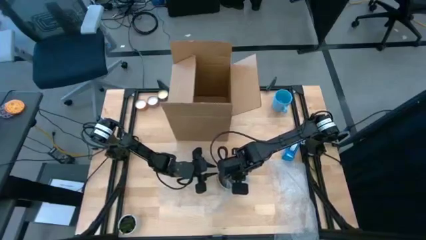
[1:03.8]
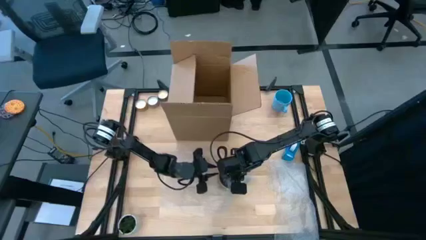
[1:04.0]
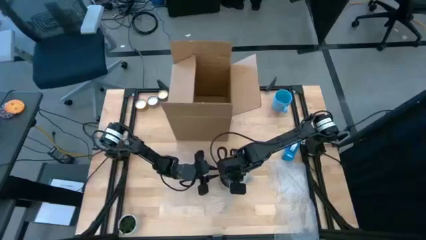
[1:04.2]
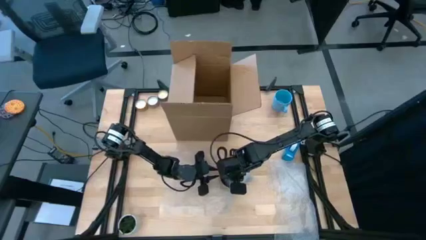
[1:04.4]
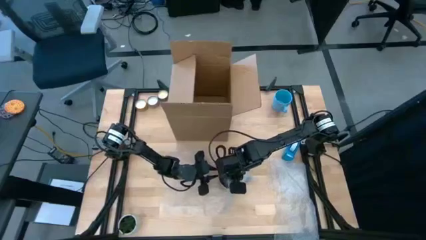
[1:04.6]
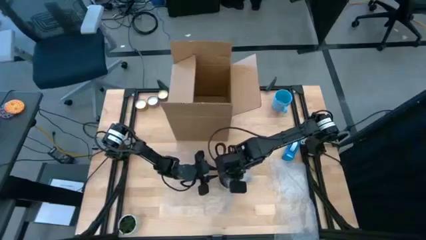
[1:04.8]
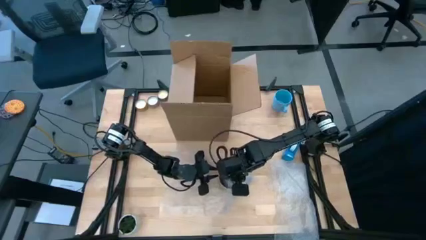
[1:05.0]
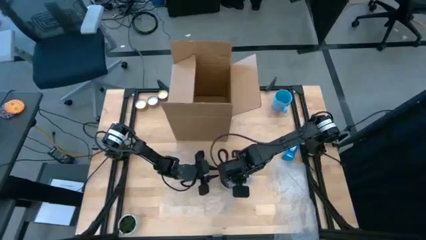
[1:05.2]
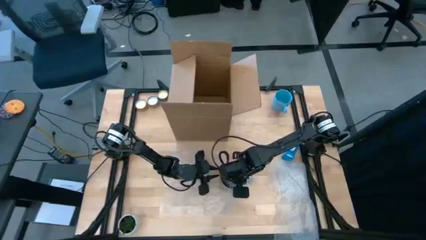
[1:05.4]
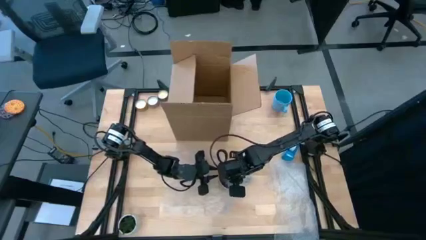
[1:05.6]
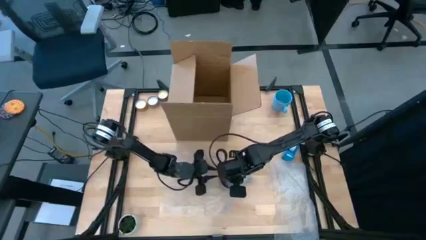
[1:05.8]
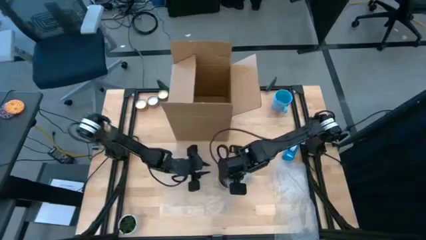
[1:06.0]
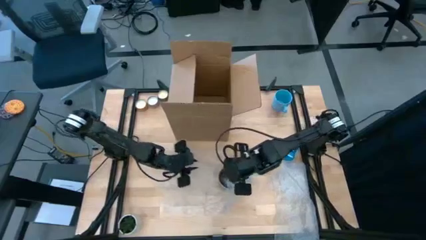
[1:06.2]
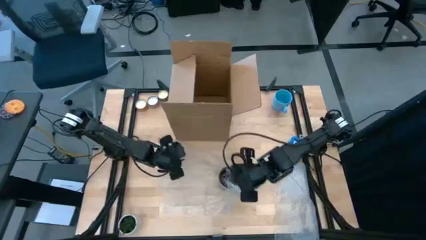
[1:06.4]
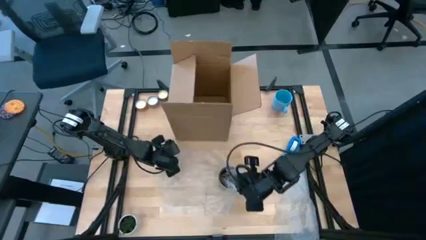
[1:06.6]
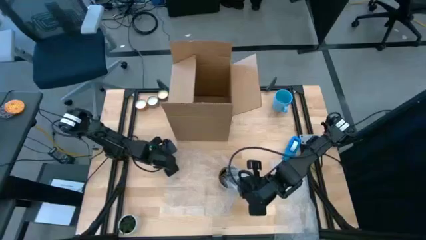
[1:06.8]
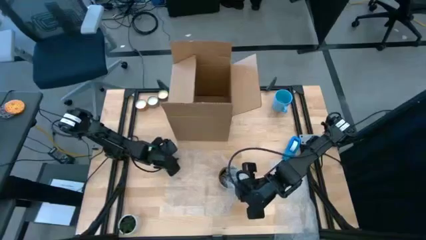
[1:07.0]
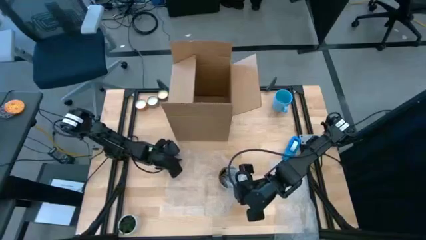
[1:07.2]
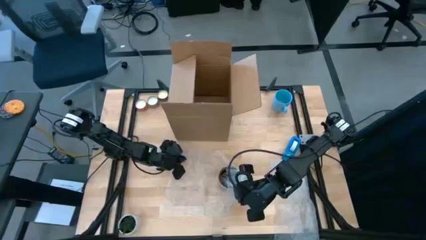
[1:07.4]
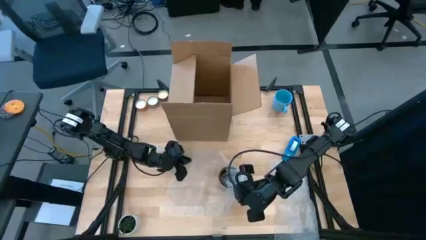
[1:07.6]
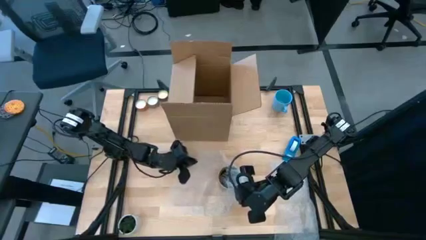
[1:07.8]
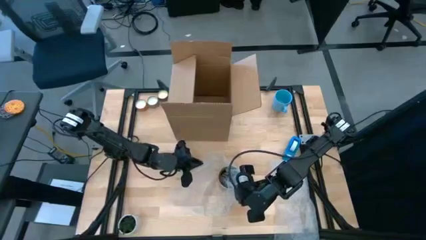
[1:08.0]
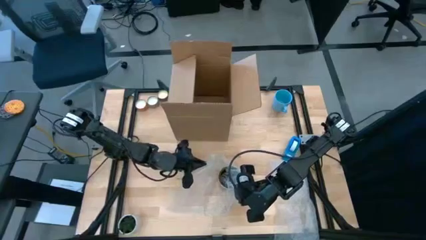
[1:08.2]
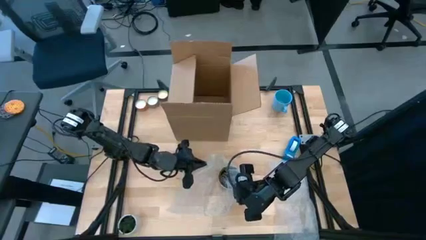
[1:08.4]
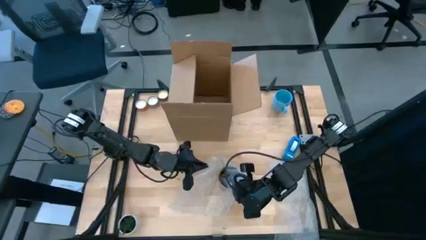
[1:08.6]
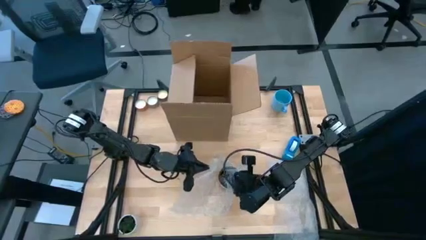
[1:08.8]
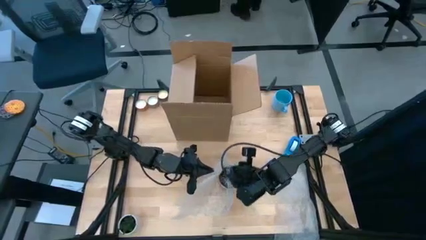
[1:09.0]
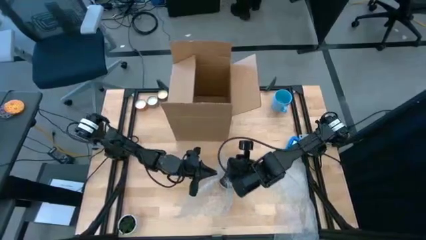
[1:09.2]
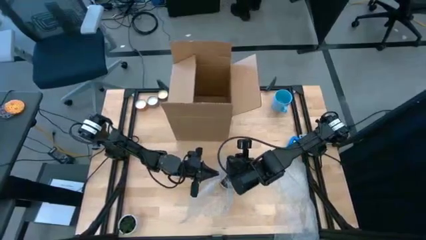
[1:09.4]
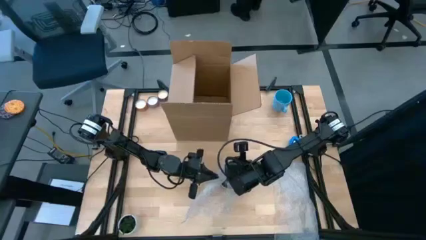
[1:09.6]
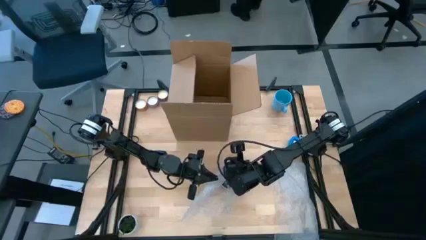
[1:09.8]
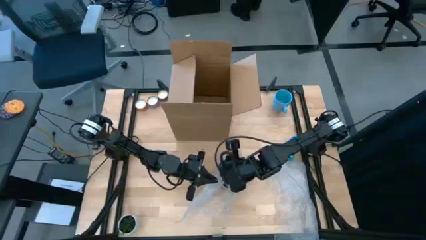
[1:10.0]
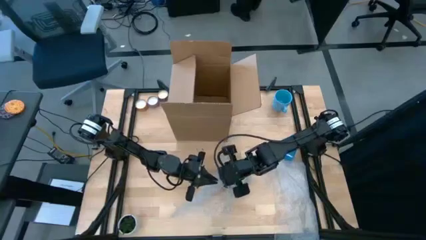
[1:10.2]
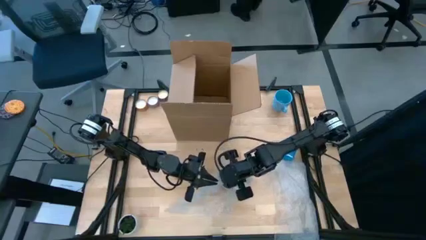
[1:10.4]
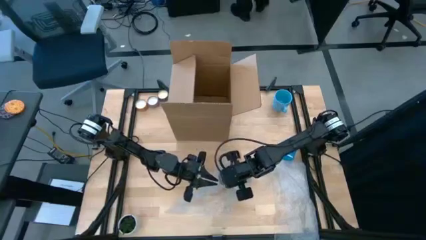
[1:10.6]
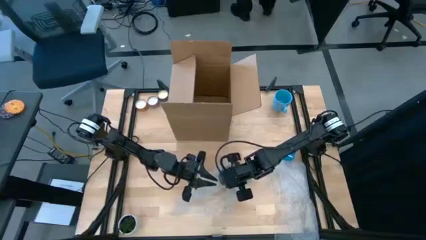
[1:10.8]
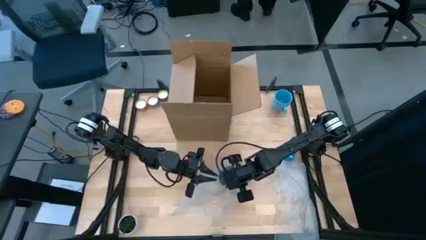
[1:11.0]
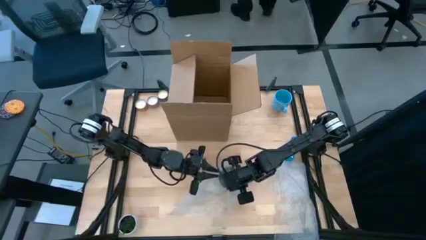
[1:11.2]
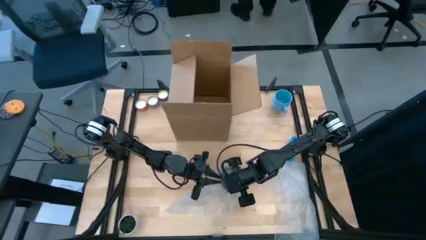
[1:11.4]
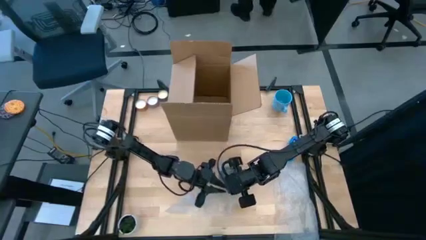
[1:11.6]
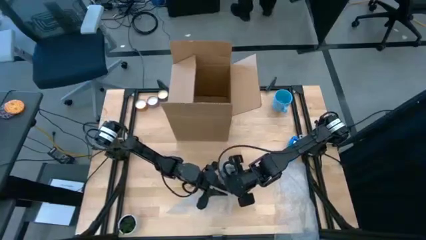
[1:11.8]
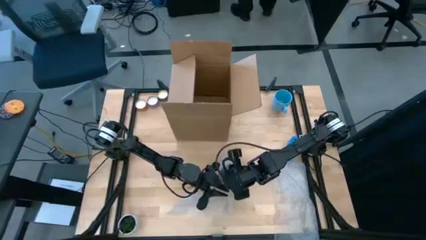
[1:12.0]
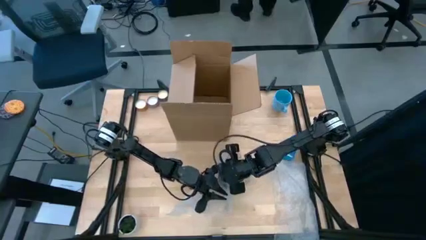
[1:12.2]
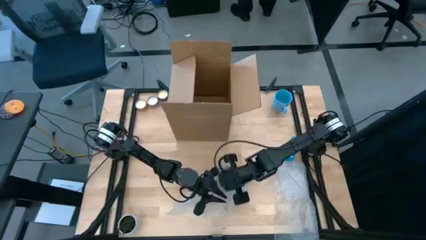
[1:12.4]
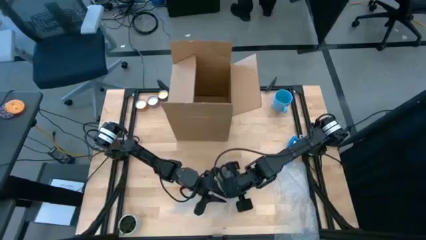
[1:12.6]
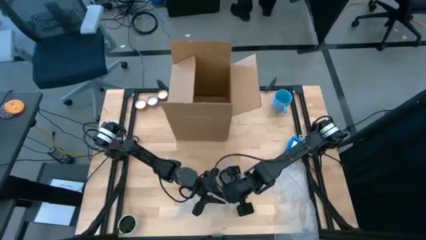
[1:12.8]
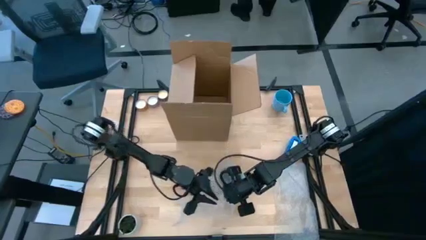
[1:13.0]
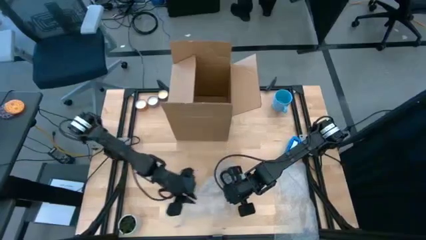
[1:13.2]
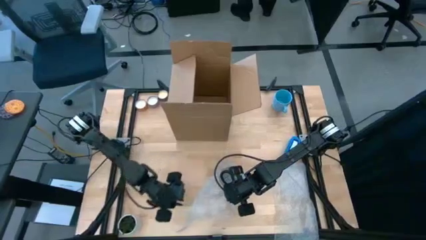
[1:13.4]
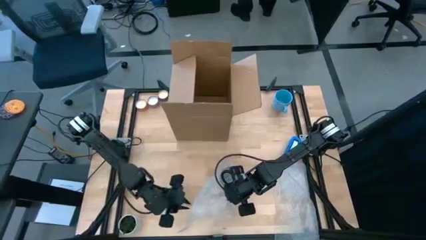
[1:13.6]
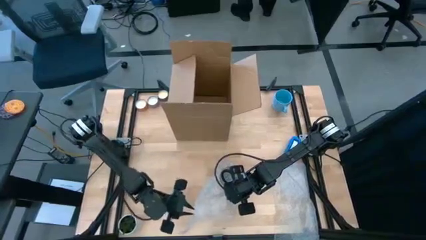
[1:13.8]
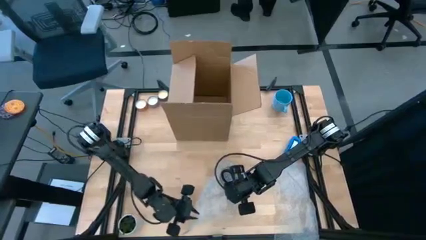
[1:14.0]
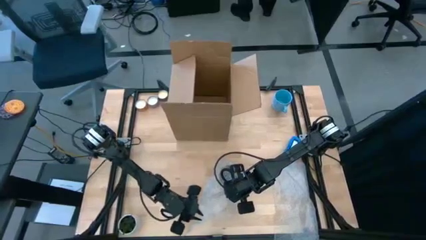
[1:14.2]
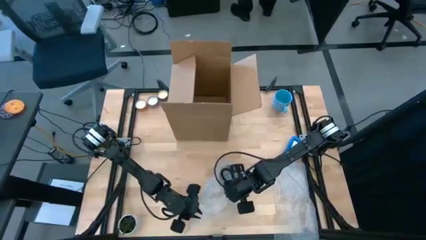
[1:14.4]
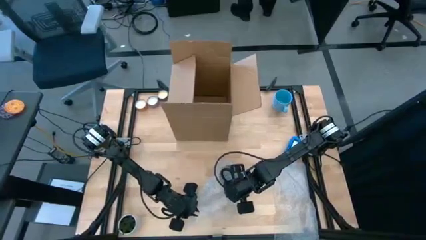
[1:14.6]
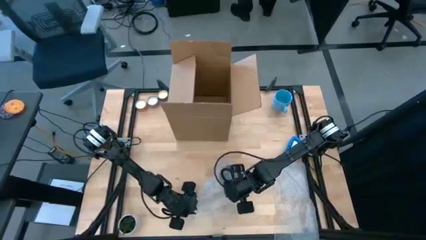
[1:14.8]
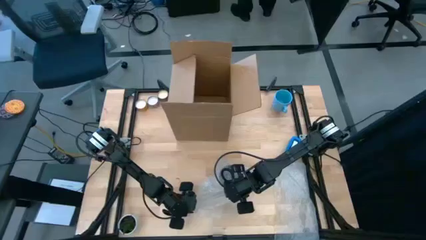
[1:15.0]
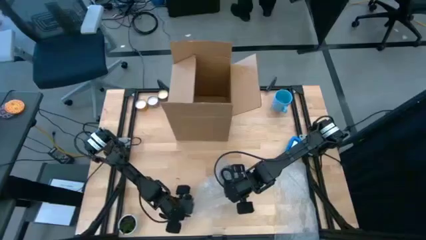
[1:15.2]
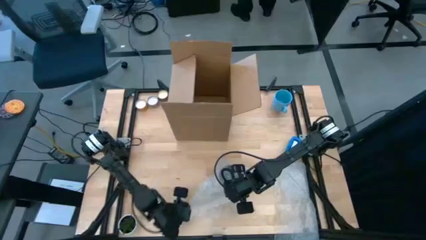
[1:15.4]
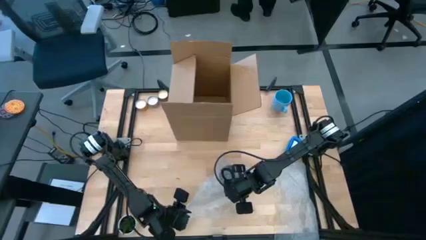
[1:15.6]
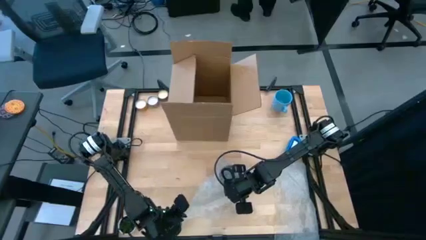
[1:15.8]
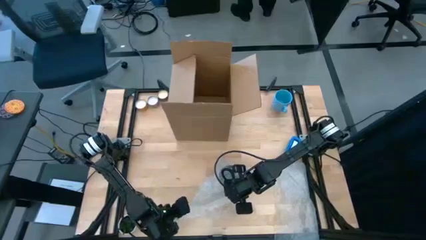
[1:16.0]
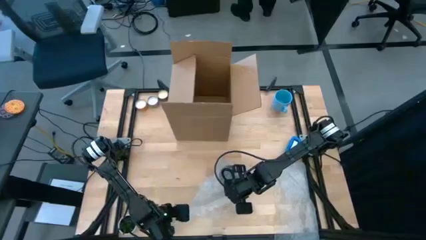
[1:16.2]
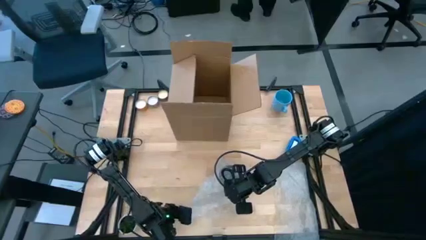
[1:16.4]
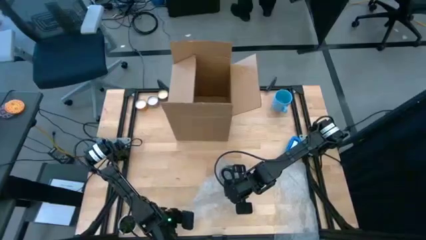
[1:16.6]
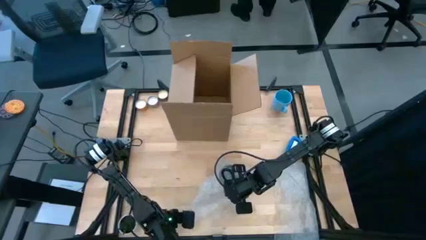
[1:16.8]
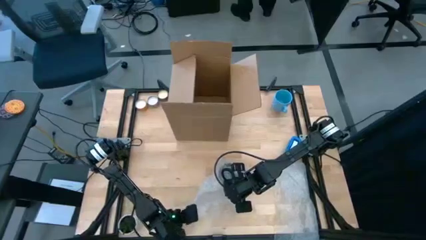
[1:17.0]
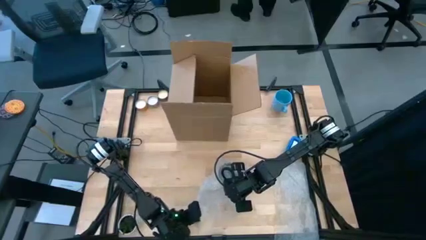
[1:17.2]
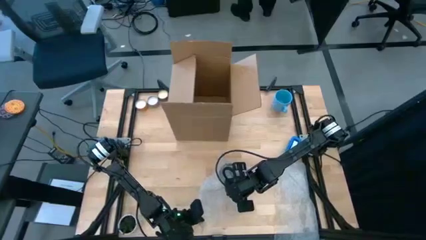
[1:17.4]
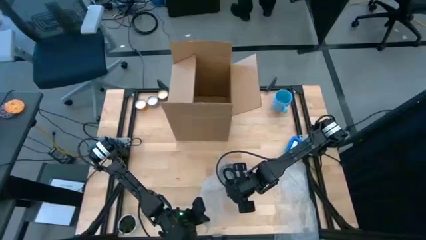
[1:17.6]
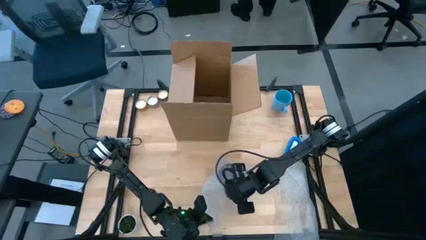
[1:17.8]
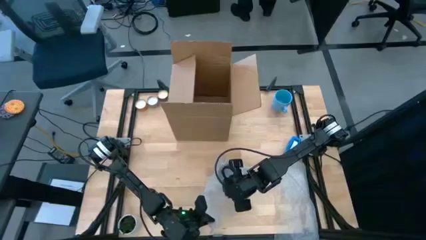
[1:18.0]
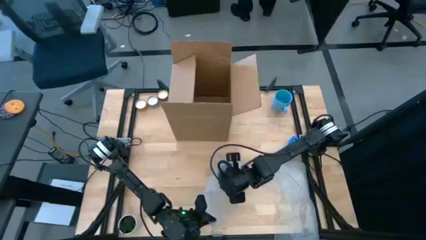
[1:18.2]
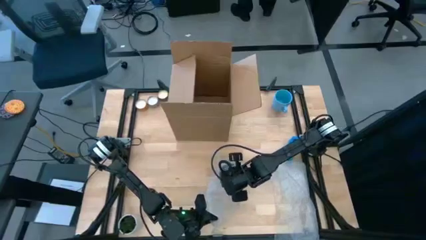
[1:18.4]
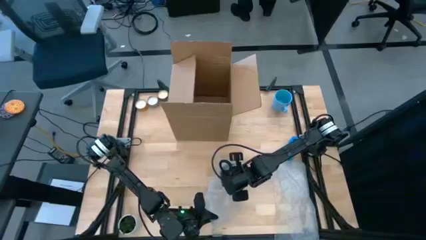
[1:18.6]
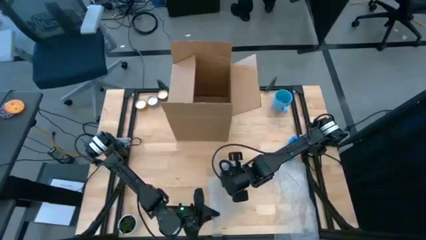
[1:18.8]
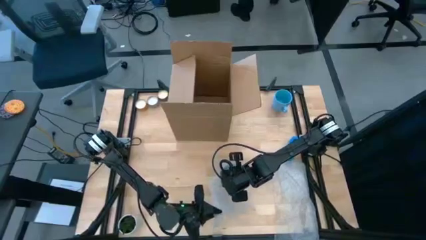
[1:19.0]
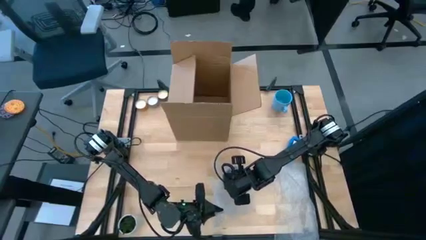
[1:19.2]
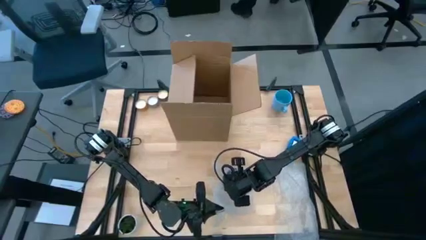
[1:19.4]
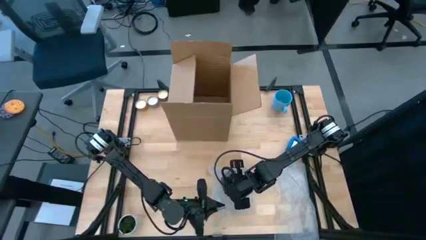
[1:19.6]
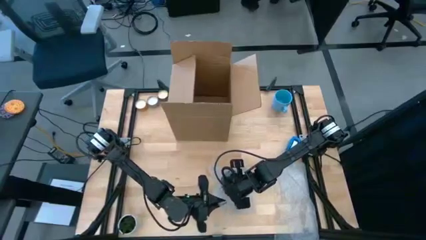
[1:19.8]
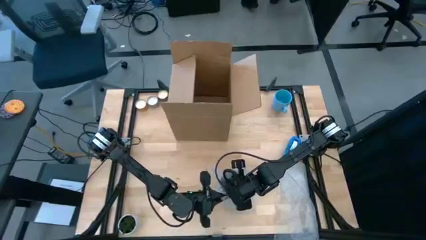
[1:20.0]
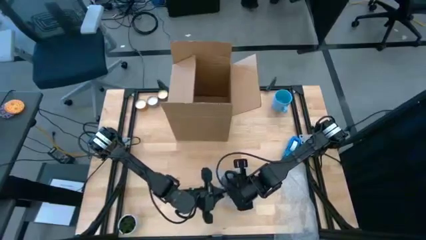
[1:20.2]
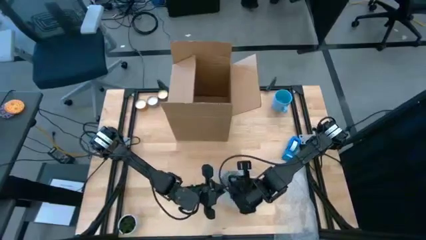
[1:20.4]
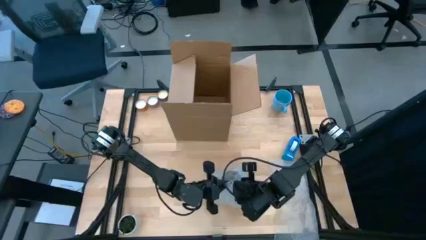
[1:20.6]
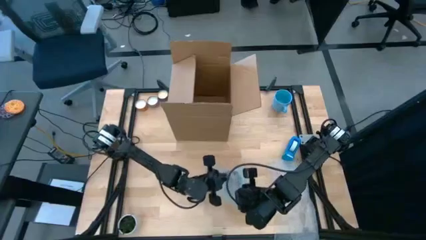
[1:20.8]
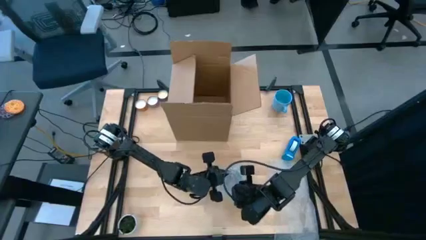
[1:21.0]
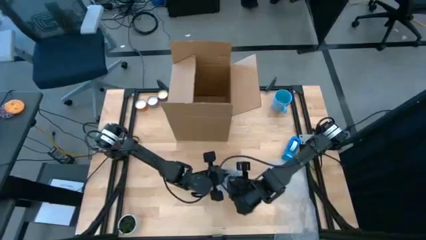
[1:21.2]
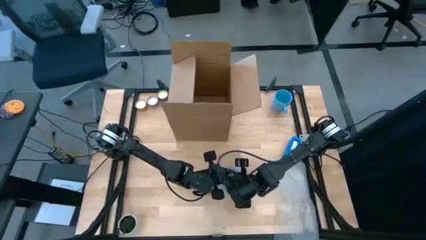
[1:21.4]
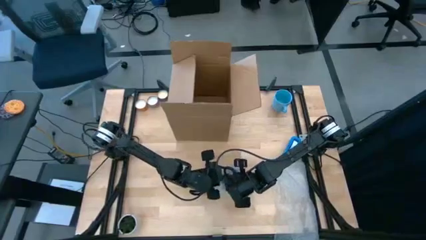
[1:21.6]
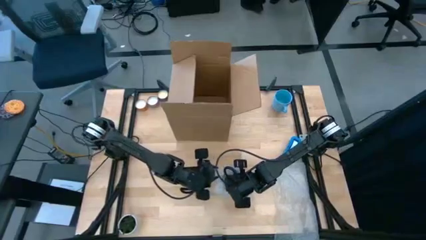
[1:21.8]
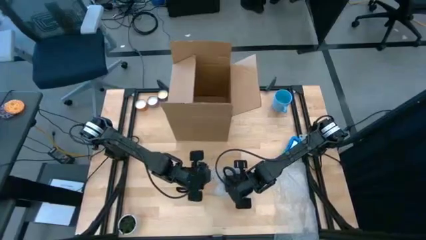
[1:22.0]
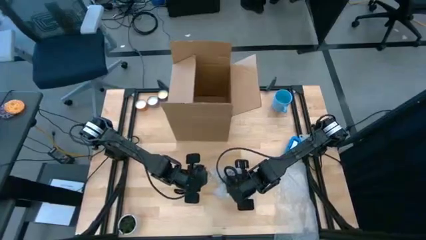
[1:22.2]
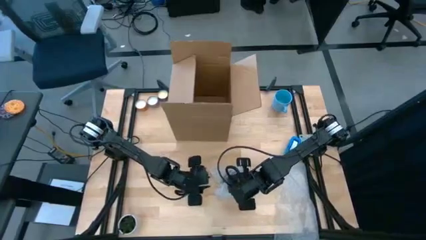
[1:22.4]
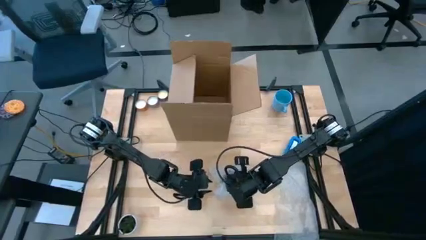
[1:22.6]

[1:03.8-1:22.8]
Task: wrap mug
Wrap the brown cup with bubble wrap
